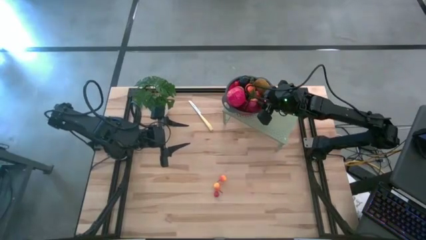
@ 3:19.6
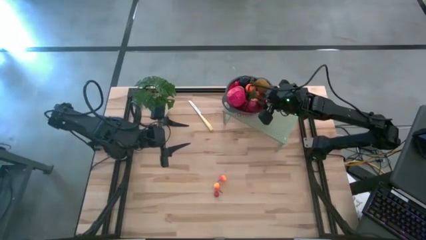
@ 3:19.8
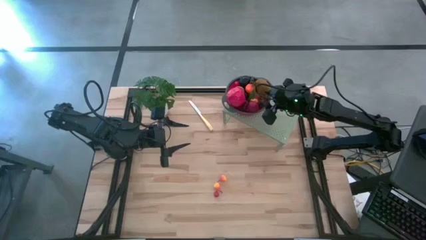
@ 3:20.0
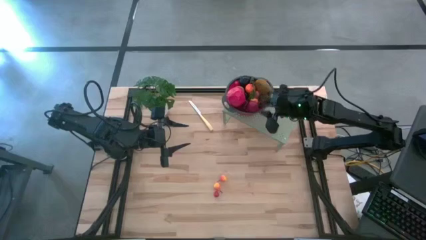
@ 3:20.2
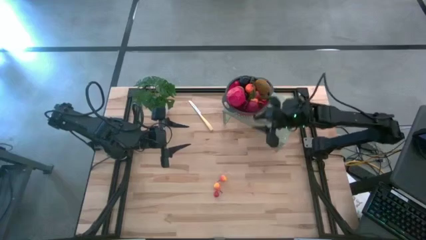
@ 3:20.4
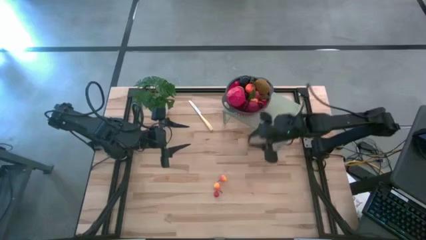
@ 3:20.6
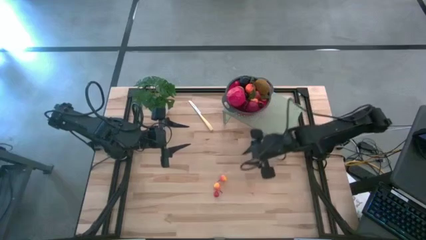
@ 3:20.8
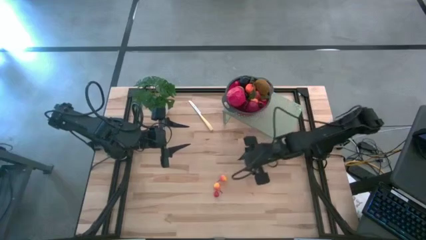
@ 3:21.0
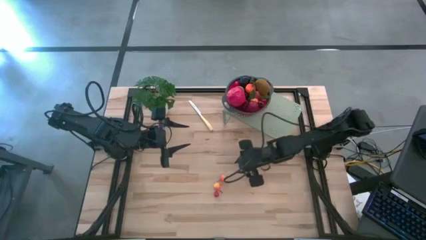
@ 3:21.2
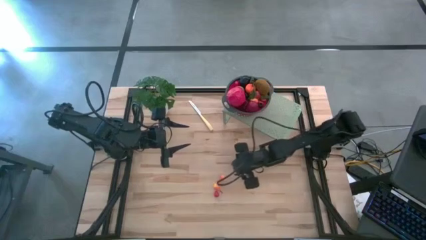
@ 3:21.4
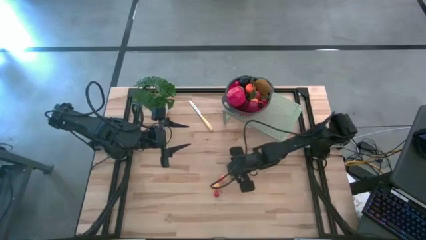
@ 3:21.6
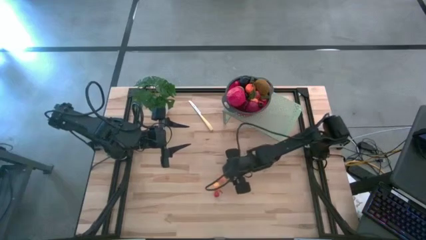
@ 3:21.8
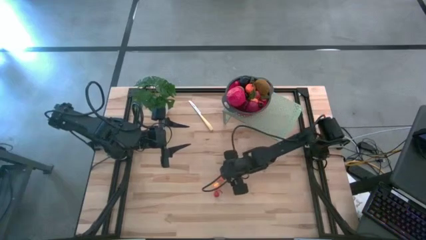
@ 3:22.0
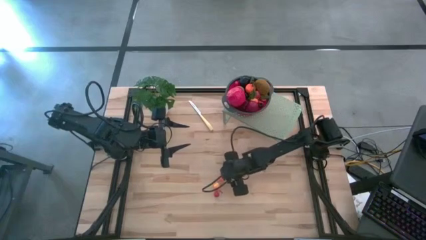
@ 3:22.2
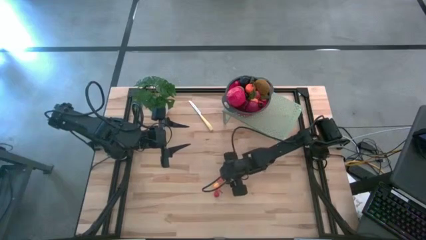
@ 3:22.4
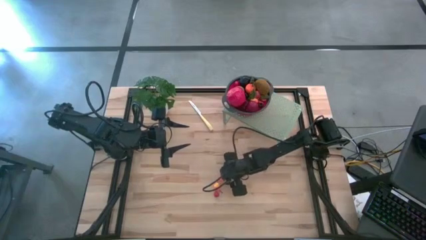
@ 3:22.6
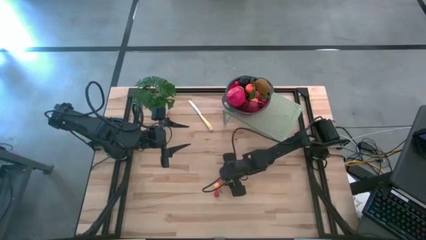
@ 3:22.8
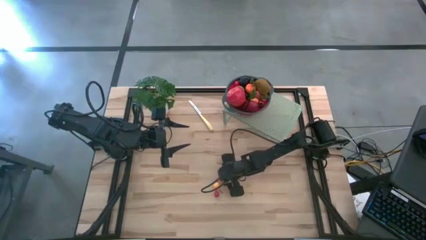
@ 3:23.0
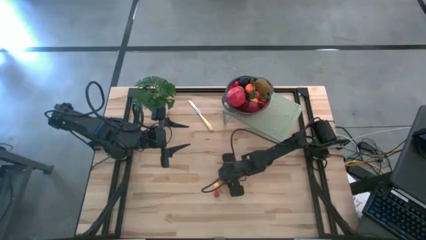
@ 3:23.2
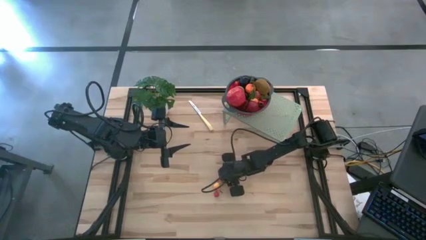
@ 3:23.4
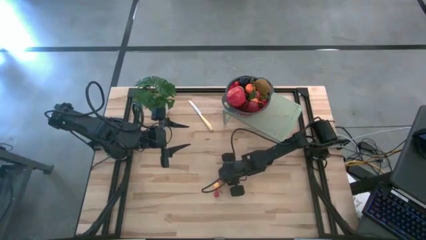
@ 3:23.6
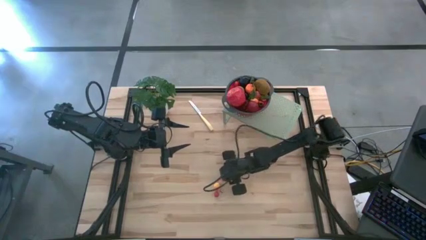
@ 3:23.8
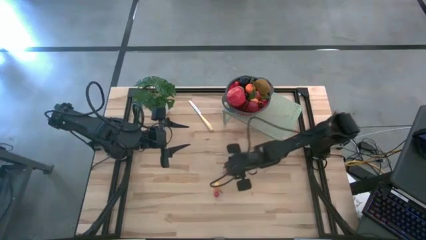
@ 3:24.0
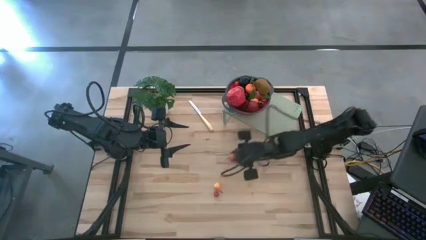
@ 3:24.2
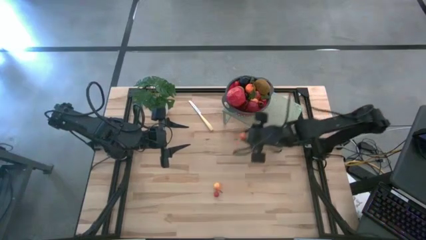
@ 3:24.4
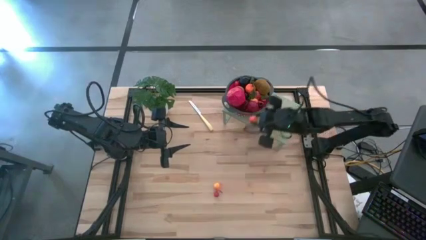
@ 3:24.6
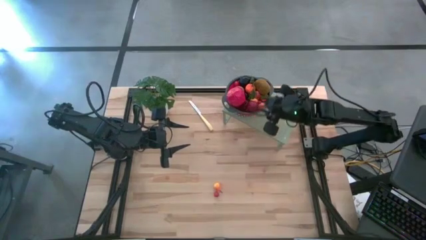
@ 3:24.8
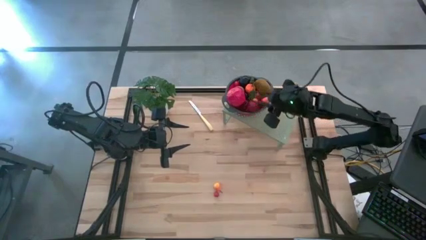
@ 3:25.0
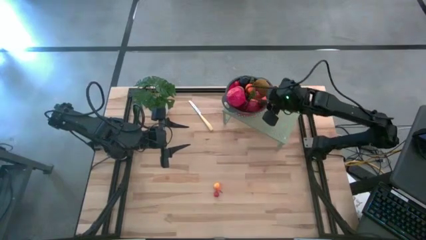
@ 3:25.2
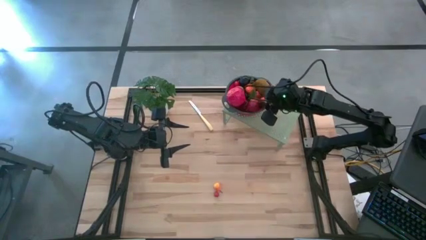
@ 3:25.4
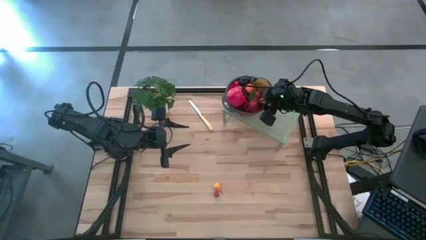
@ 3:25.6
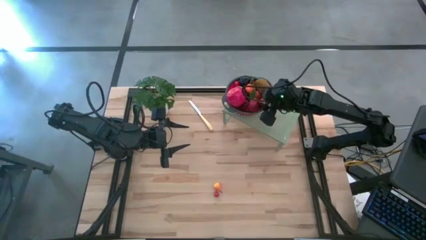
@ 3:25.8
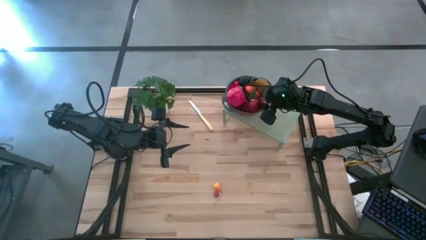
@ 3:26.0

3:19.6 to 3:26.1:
Task: Pick & Place Fruit
Put the orange pear into the red gray colander on the shelf

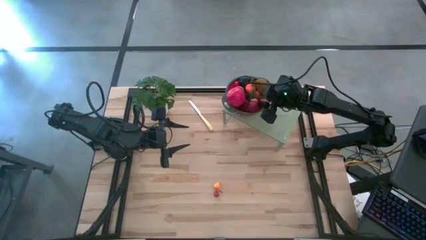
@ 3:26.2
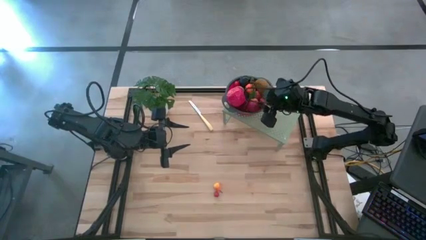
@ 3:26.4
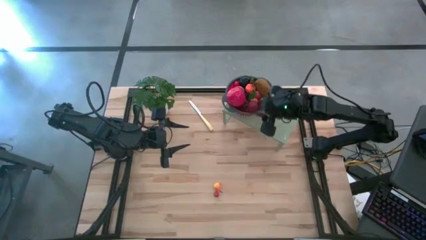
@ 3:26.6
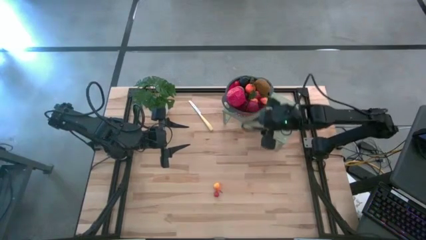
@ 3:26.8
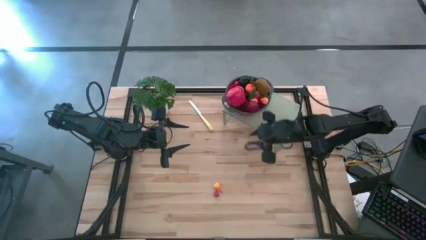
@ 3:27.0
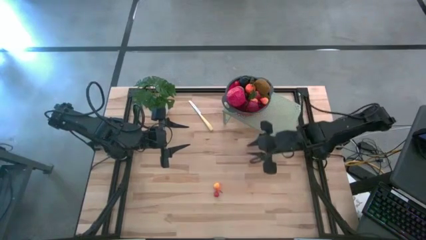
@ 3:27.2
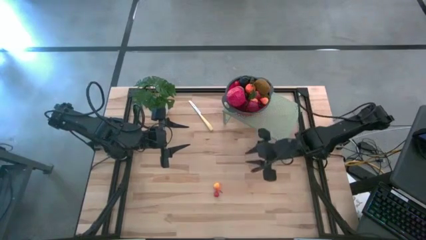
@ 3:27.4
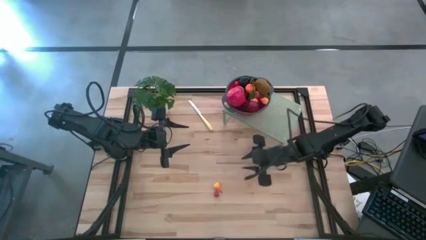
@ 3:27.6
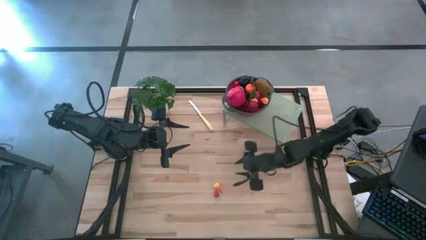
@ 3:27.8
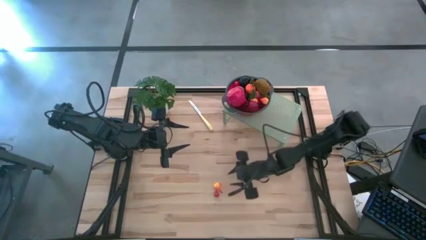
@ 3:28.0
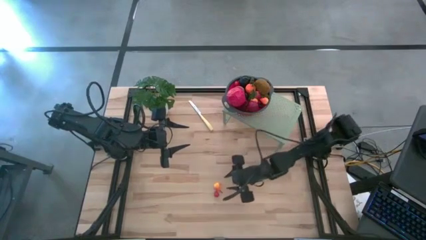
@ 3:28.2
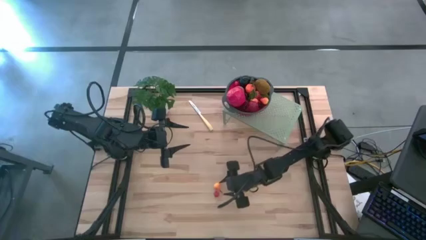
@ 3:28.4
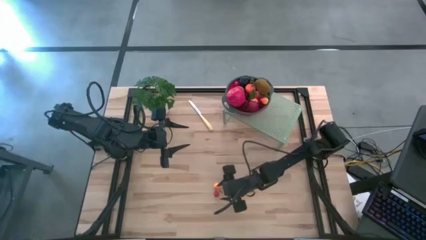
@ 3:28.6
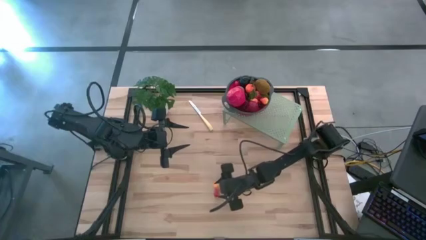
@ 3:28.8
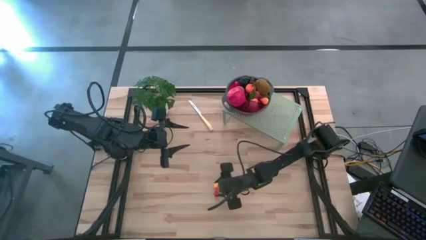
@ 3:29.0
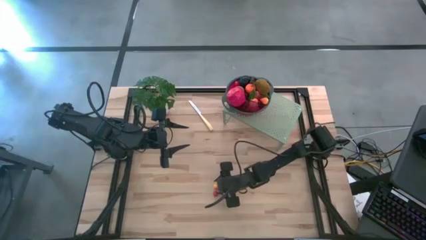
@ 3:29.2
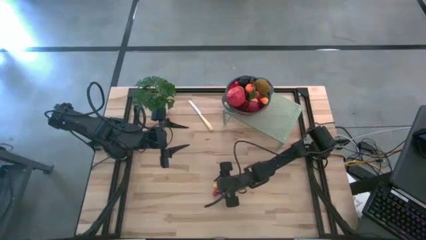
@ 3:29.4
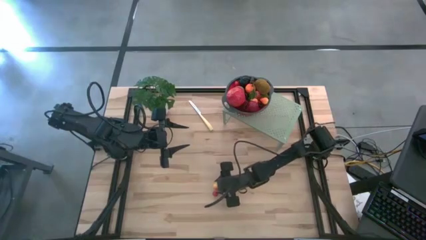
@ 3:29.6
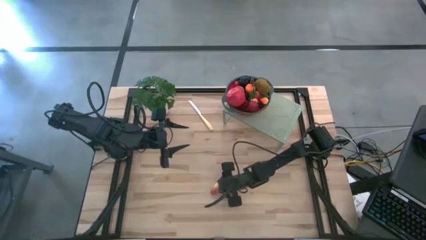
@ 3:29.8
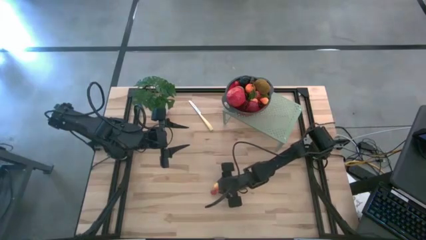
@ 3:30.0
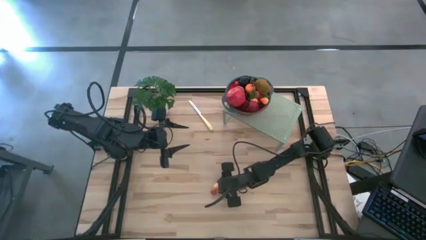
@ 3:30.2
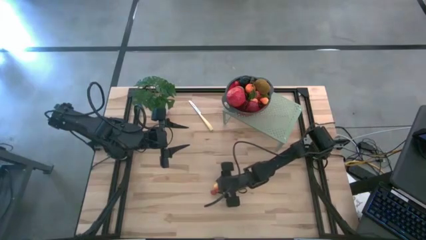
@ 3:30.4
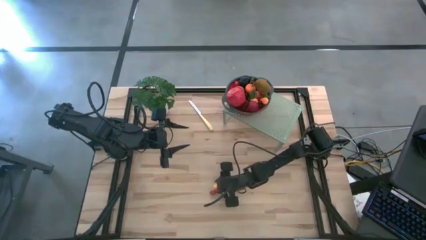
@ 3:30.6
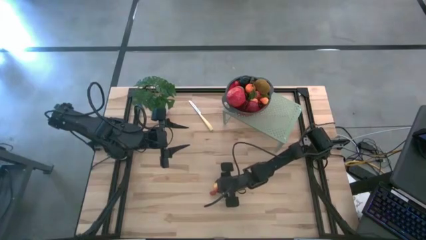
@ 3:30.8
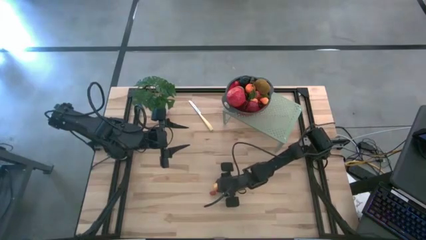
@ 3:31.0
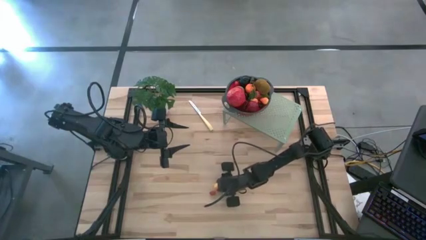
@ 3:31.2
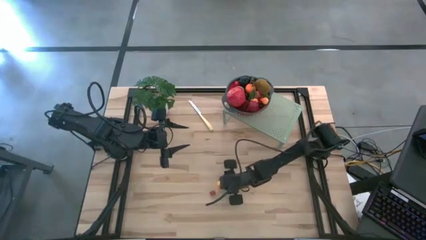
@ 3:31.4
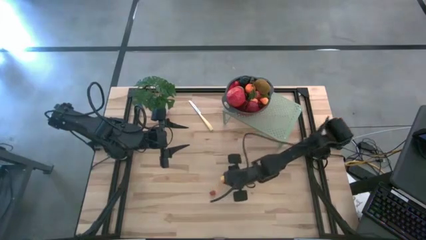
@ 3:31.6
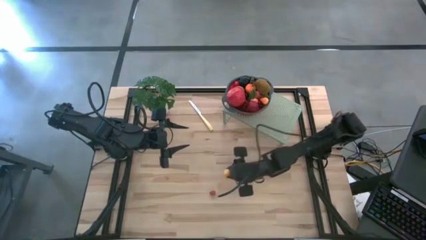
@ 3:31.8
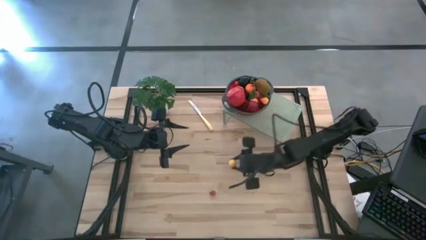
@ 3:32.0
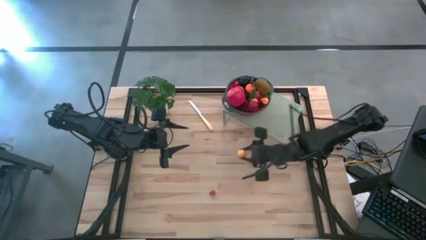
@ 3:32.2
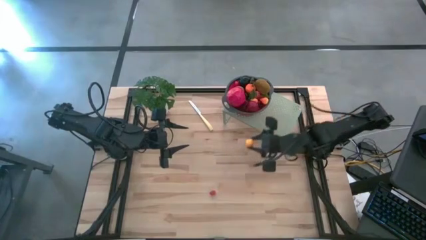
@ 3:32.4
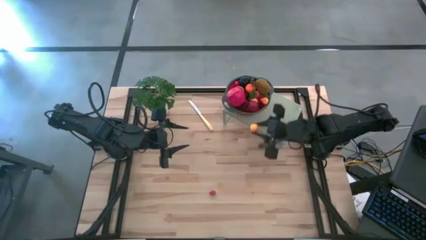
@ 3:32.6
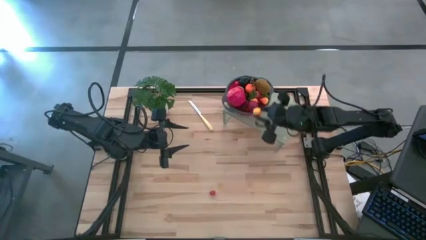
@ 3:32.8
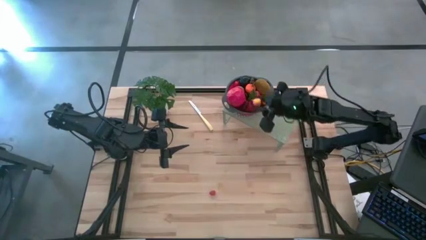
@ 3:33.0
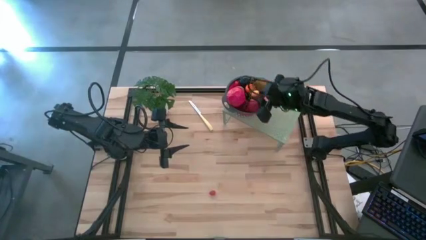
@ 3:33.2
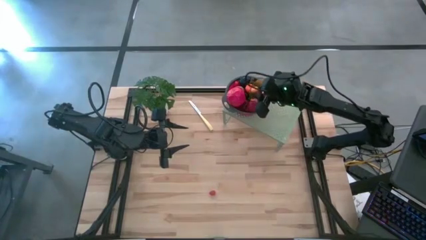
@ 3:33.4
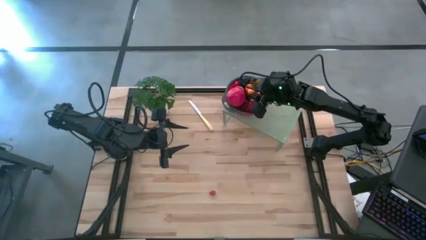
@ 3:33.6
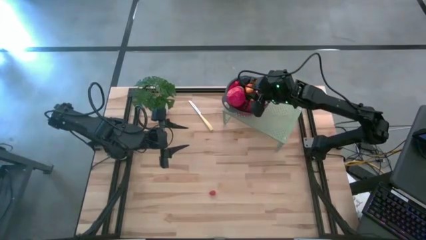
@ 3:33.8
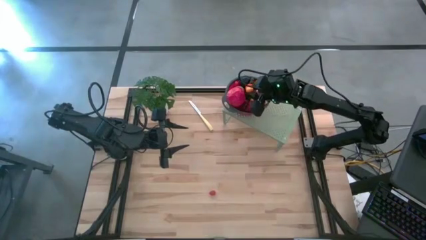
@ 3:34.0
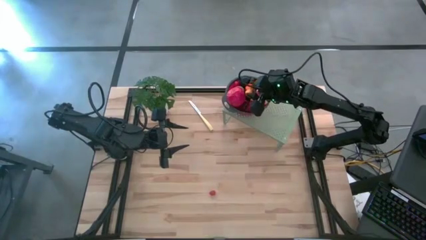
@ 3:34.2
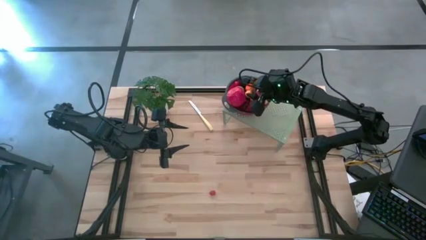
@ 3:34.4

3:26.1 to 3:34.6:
Put the orange pear into the red gray colander on the shelf
